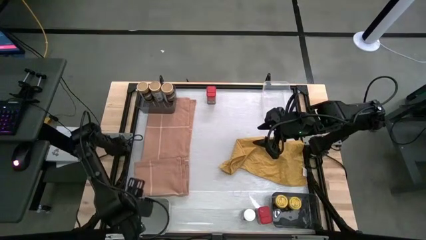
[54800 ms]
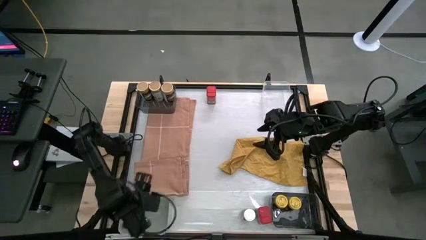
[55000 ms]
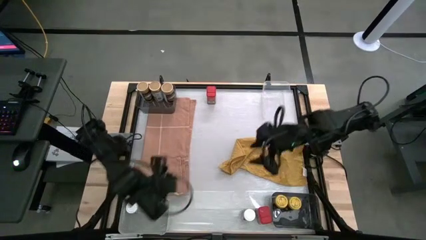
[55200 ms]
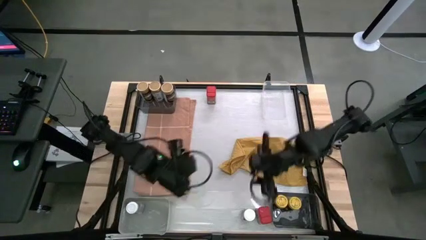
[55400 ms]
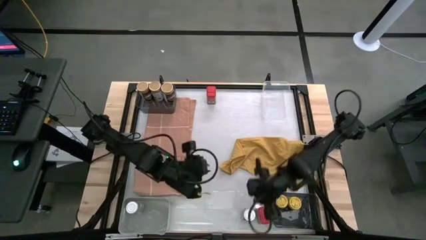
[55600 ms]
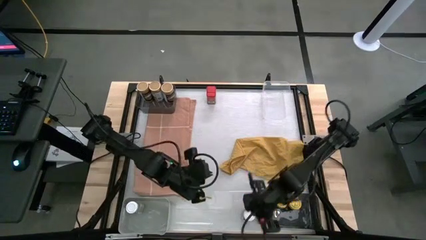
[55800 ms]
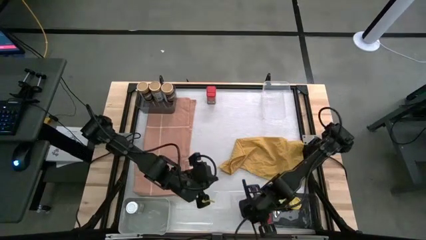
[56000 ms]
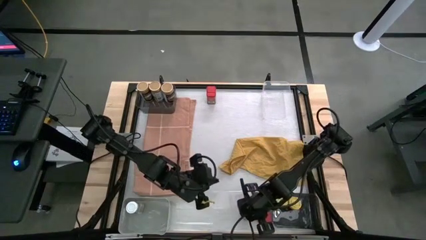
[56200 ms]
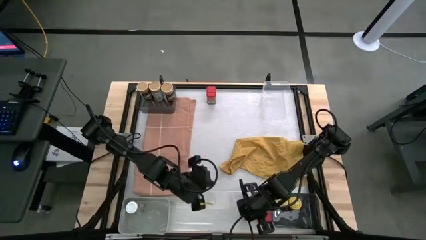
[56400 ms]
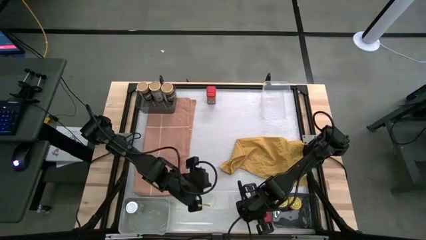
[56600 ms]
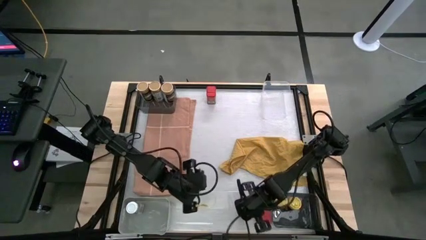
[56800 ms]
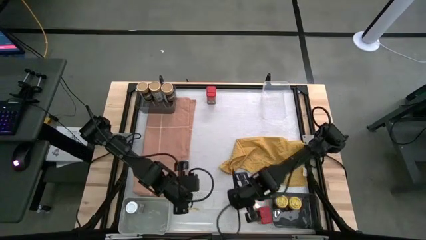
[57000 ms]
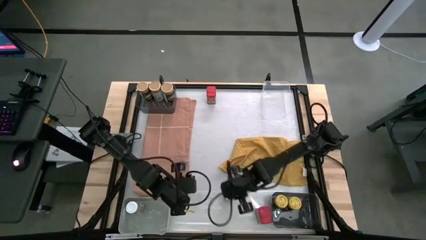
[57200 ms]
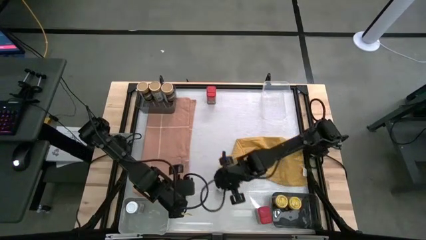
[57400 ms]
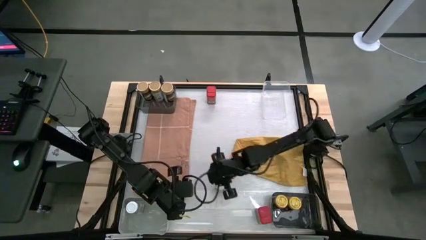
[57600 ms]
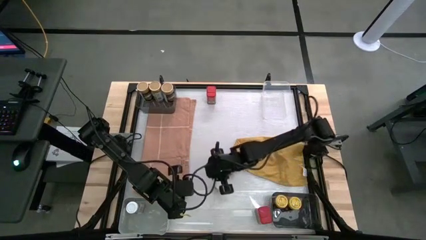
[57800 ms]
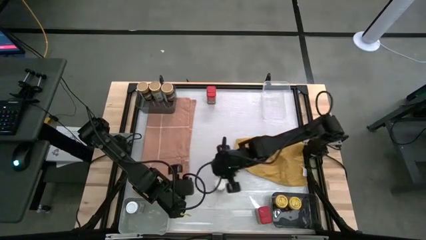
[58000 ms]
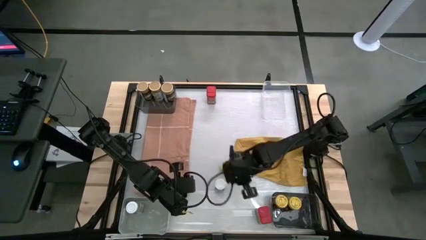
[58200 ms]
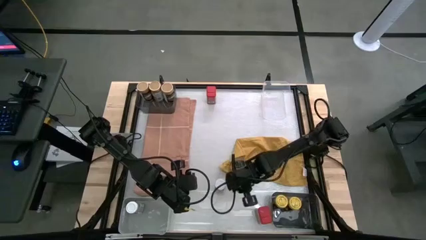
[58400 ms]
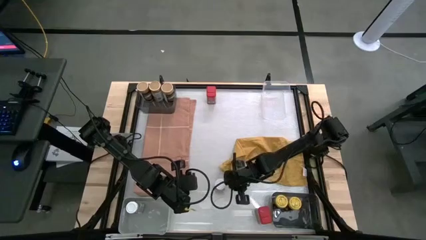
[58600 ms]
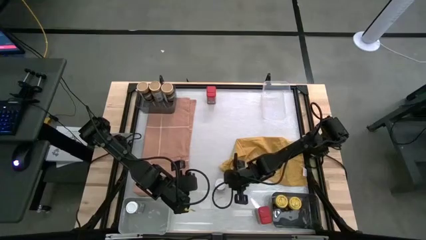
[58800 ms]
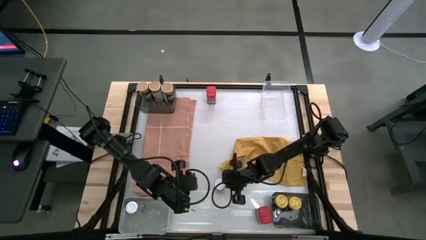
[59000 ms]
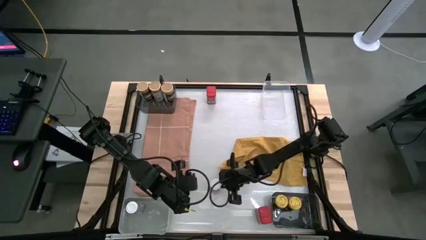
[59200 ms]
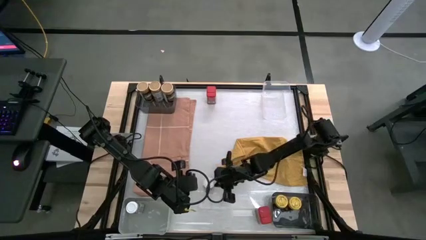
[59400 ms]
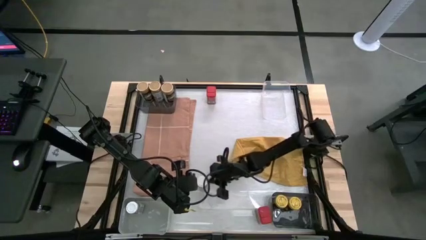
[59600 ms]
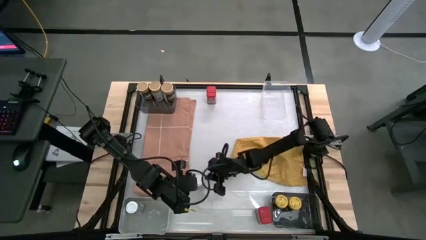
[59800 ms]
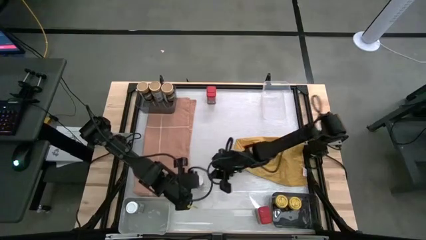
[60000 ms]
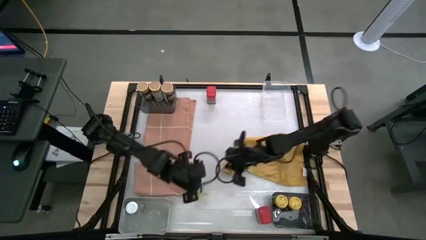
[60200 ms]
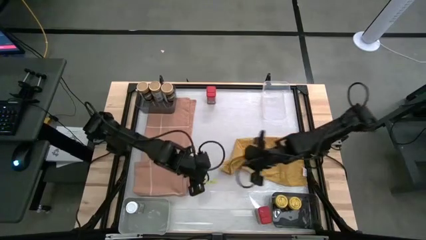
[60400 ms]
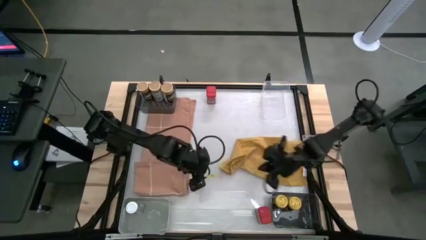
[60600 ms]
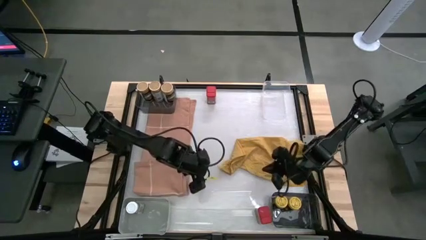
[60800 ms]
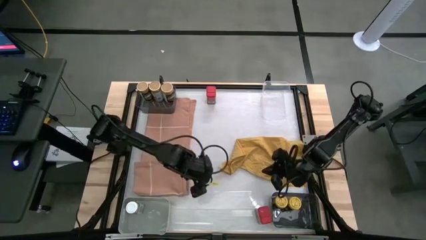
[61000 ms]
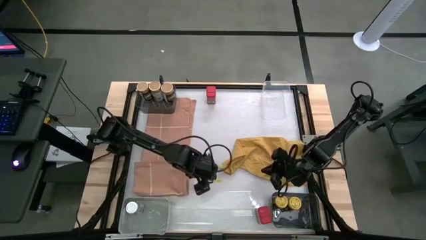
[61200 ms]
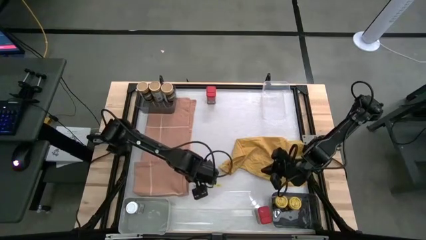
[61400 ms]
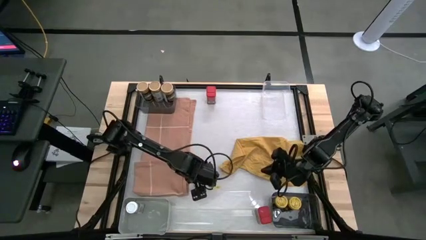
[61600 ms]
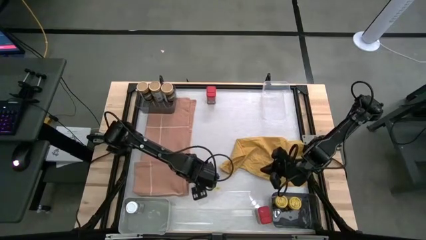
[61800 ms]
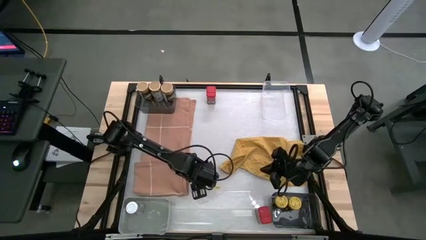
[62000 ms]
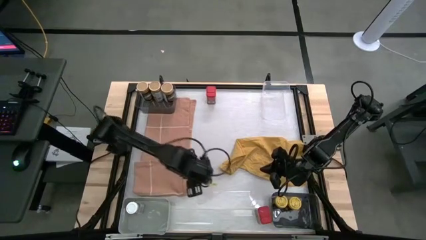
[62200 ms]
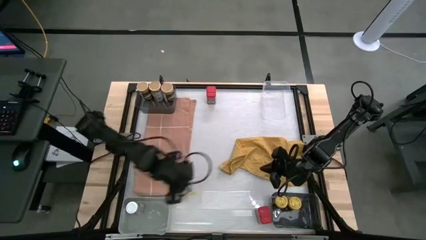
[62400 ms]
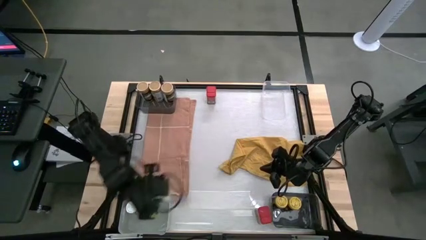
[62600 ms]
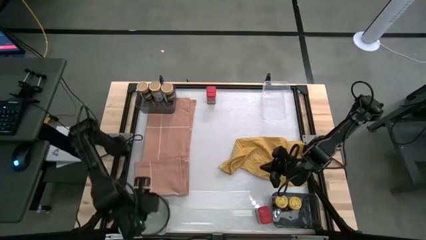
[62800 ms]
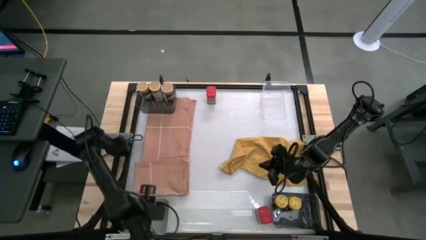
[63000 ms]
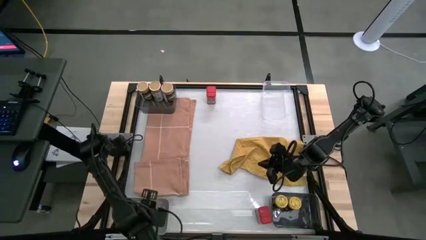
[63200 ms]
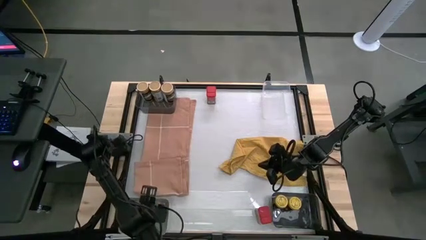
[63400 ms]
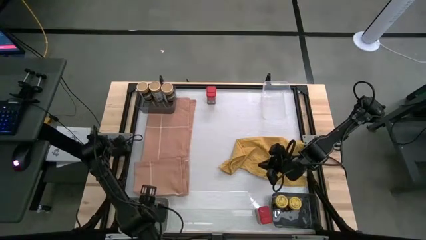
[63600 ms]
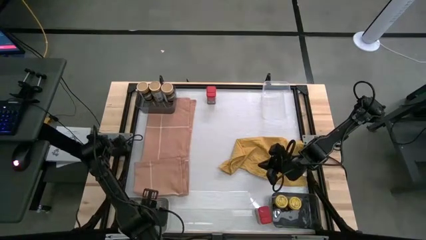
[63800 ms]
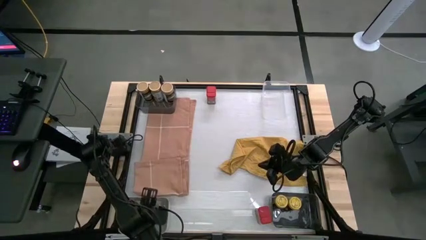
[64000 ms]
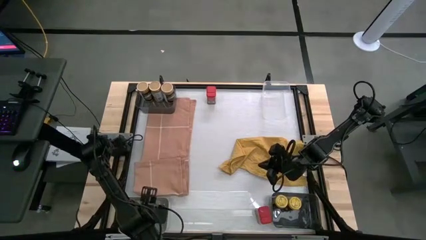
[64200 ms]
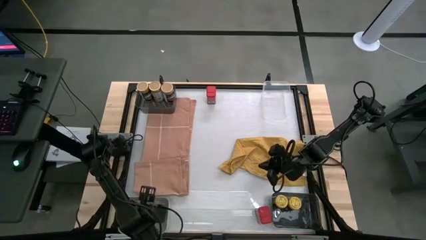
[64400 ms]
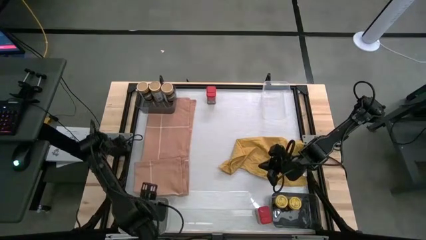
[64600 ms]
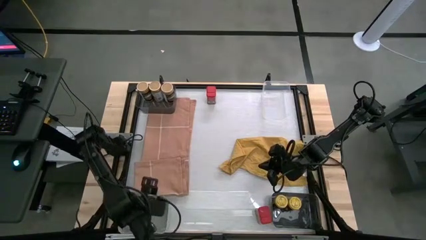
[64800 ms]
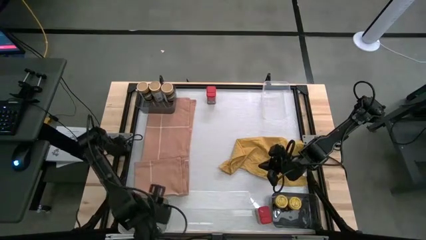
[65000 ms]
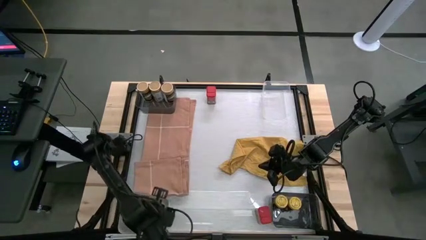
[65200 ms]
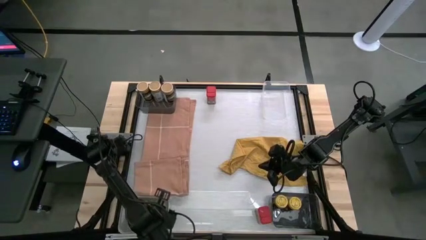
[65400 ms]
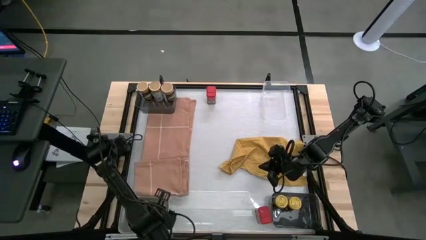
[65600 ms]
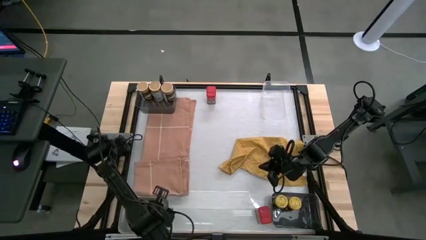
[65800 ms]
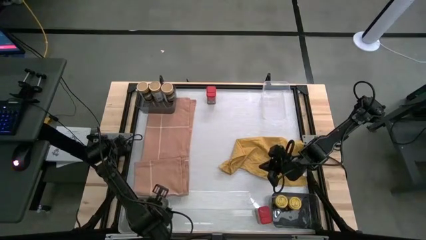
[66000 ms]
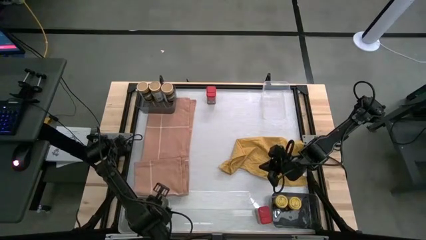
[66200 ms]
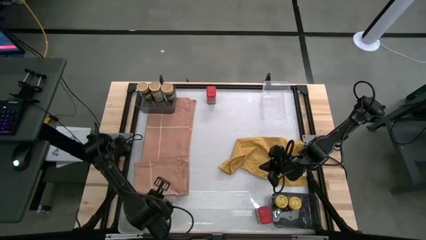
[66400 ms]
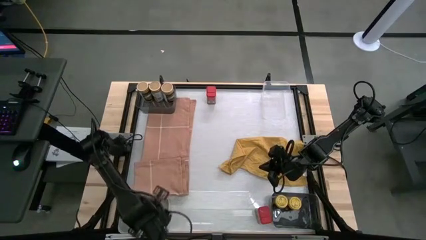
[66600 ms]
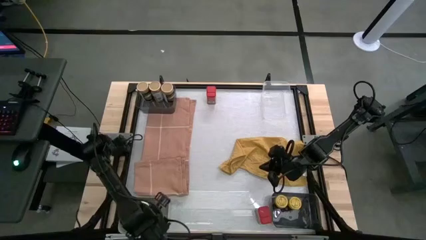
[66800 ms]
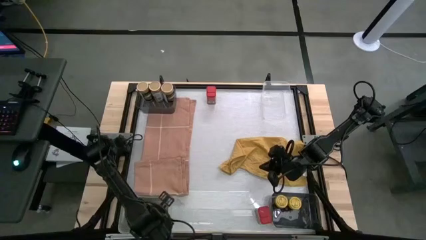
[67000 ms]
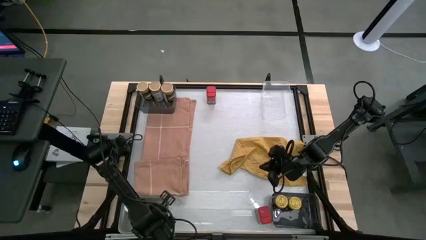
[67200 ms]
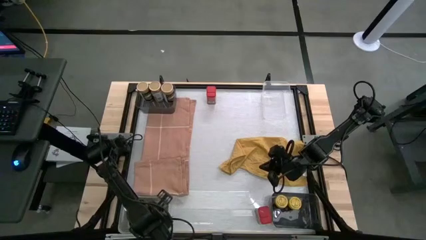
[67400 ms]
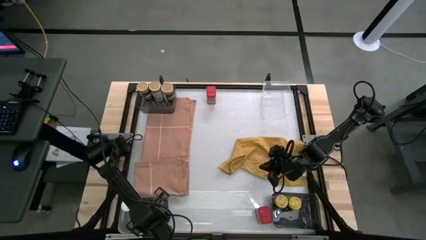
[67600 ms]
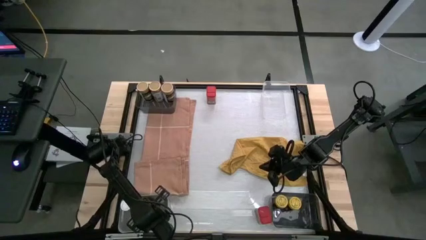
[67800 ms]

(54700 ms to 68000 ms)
Task: Sort spices by type
Put the white seasoning bottle into the gray bin

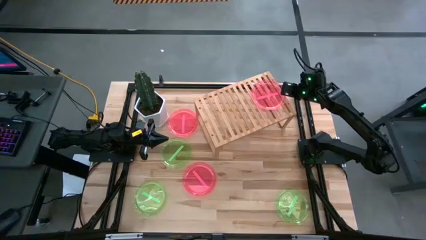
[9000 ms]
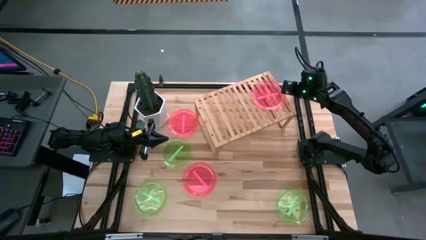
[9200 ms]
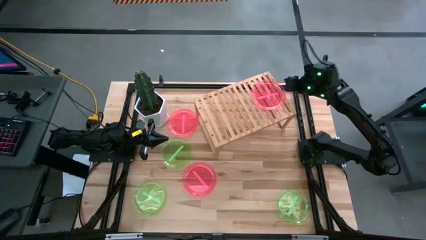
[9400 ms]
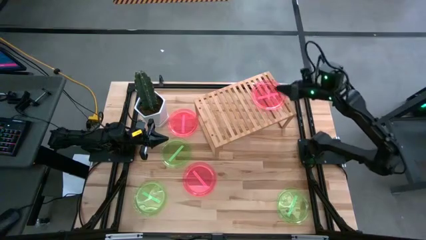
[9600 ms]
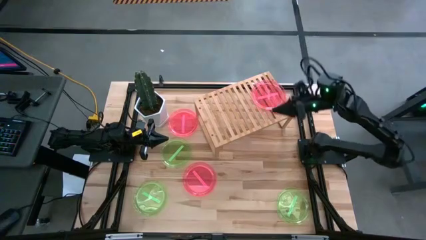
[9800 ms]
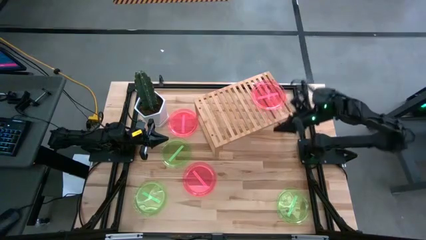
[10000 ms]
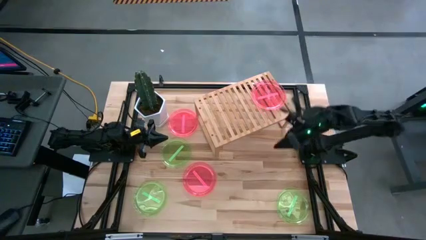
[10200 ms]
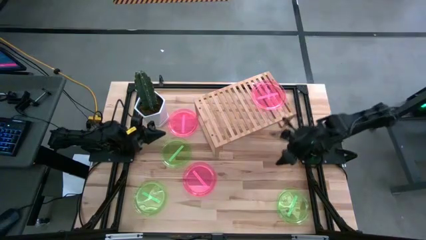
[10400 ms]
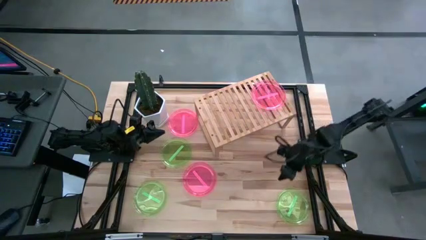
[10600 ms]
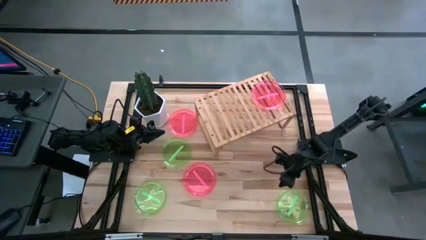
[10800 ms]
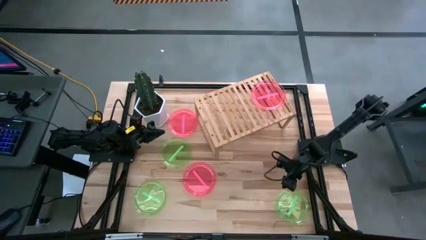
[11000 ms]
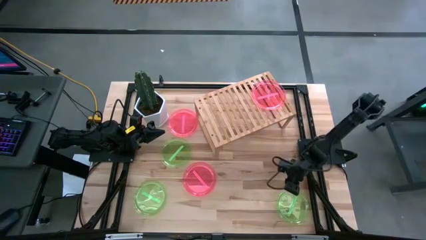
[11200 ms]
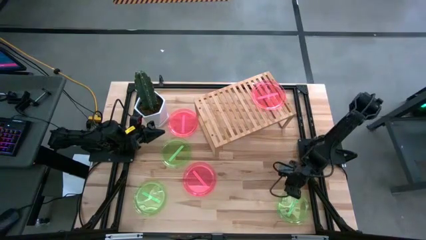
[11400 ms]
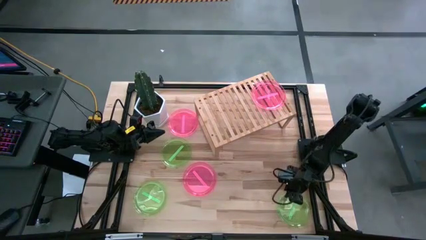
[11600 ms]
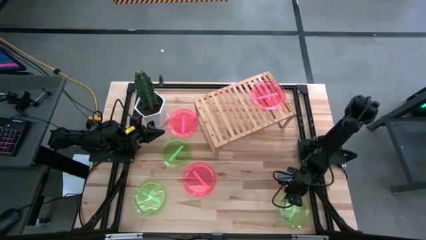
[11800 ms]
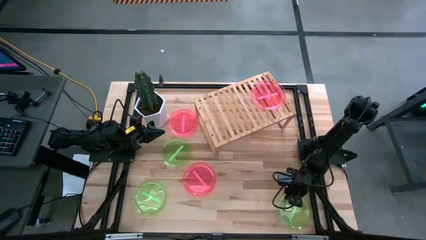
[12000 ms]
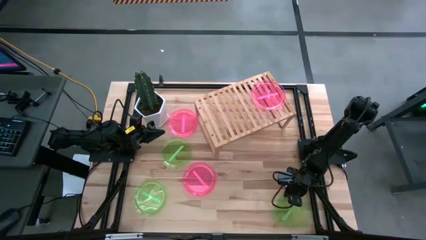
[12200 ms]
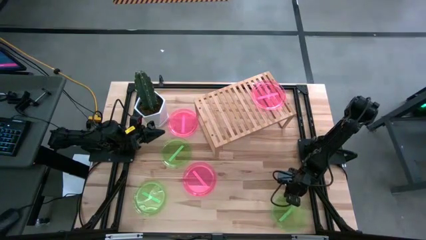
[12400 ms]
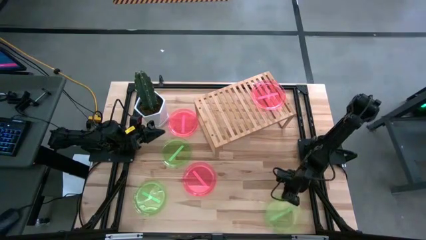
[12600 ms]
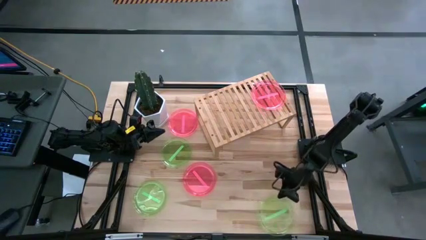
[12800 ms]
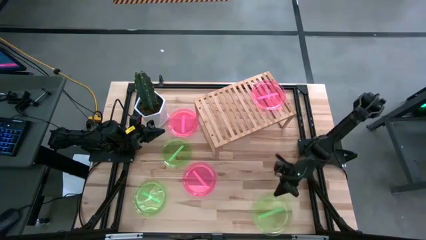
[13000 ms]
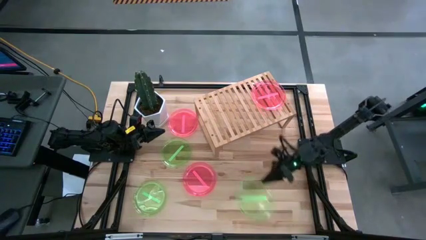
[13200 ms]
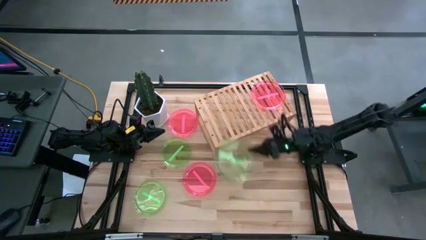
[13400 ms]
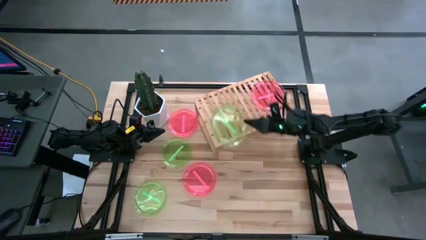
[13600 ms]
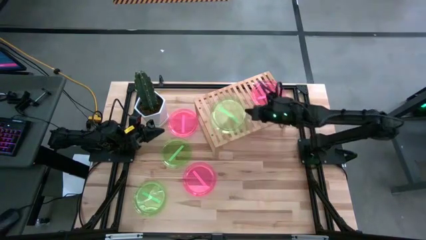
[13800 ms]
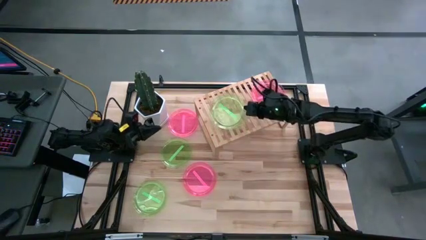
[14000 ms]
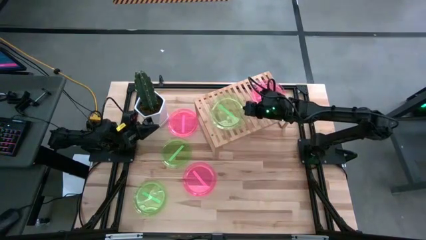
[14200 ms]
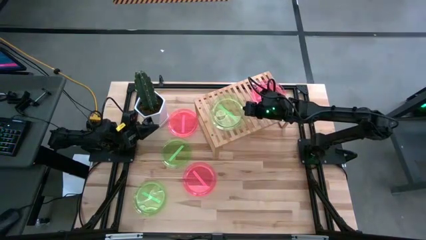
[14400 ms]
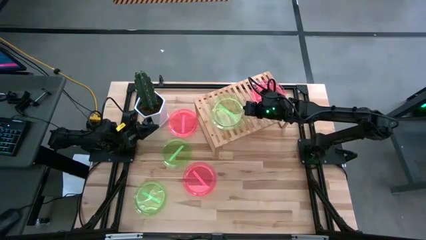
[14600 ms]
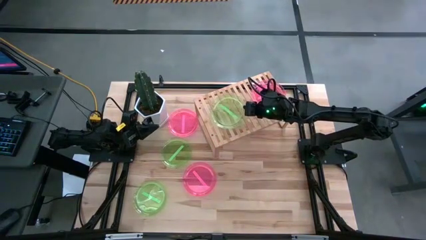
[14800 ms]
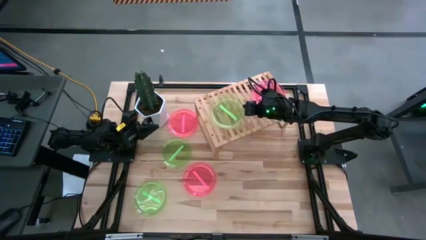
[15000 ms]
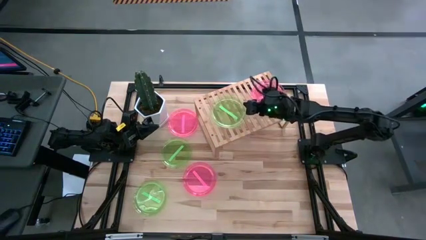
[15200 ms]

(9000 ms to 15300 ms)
Task: Place and stack plates onto a shelf
Put the bottom right green plate on the shelf
